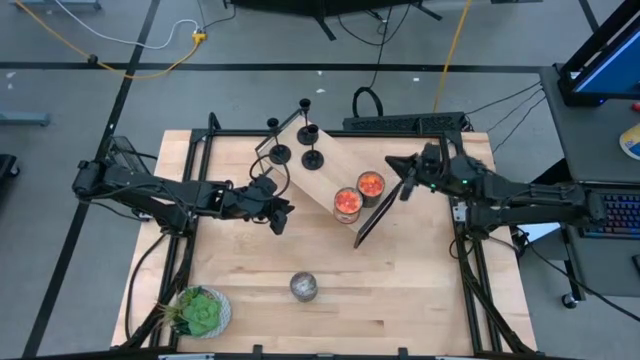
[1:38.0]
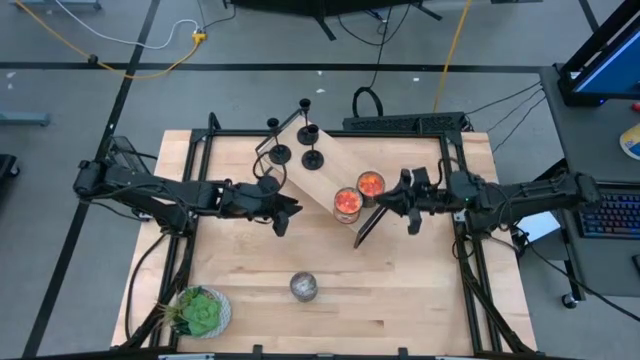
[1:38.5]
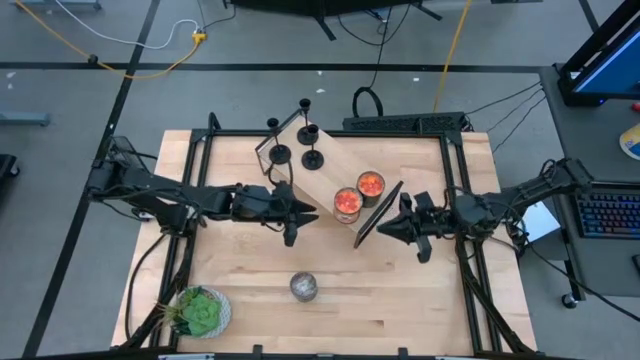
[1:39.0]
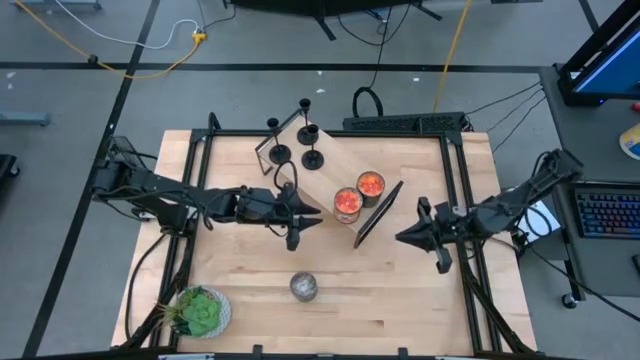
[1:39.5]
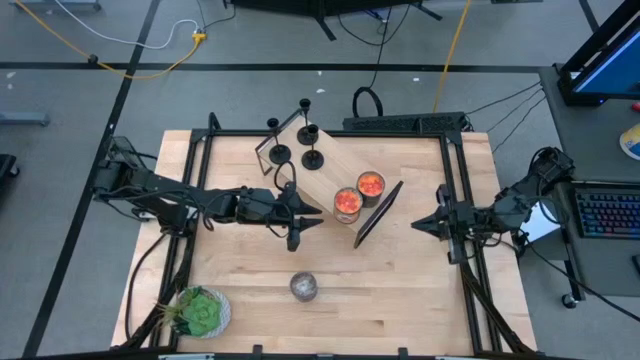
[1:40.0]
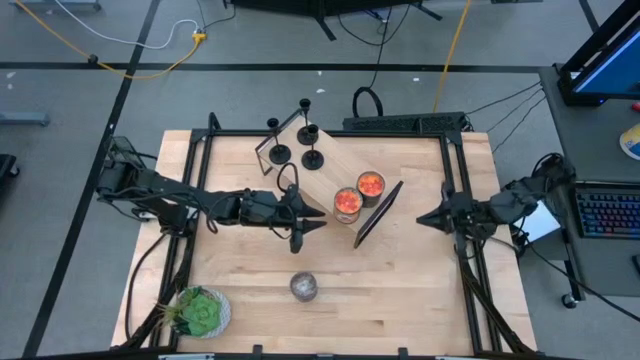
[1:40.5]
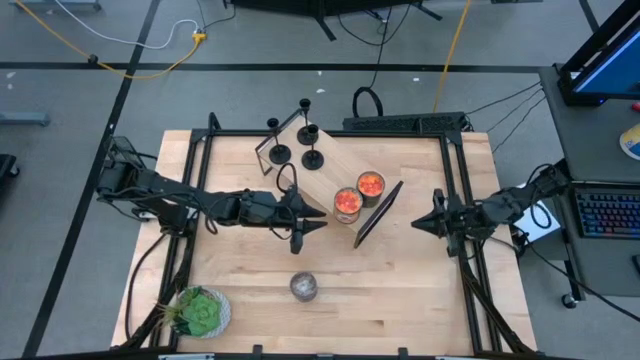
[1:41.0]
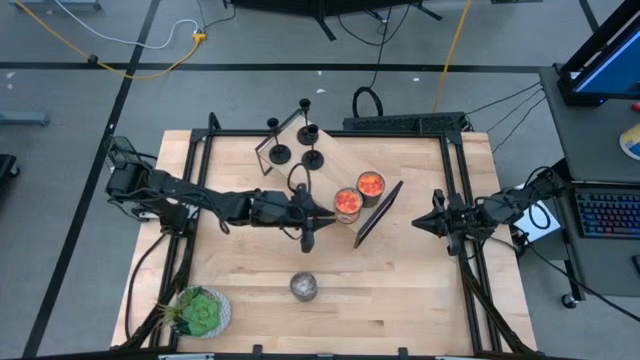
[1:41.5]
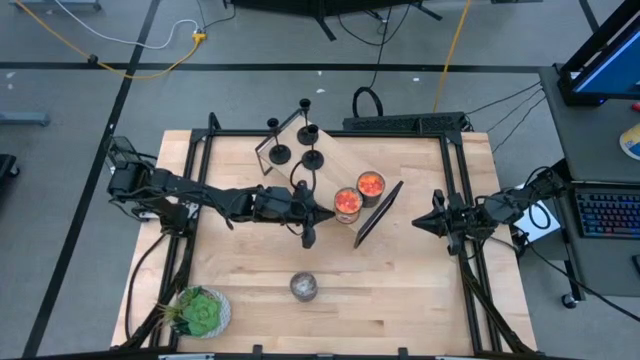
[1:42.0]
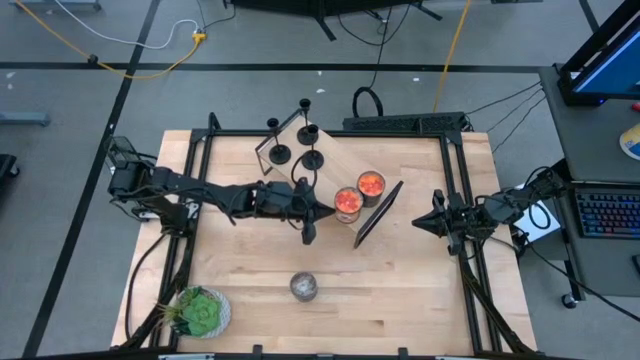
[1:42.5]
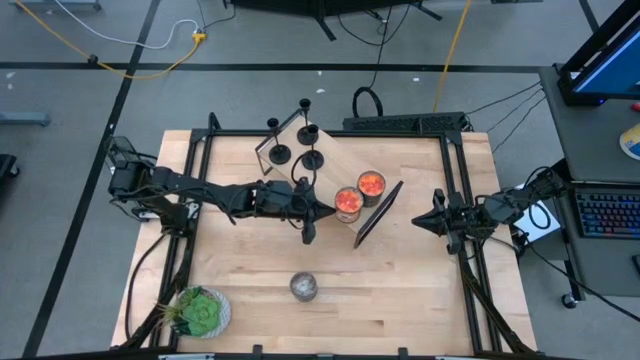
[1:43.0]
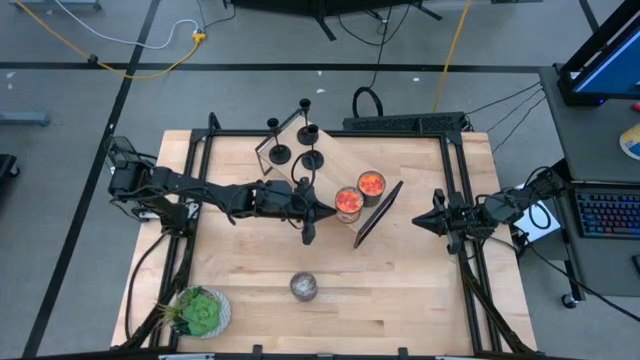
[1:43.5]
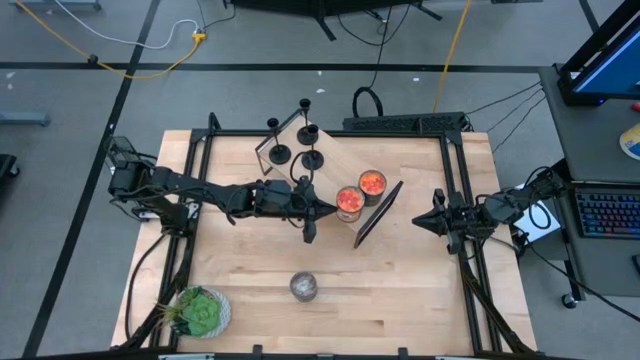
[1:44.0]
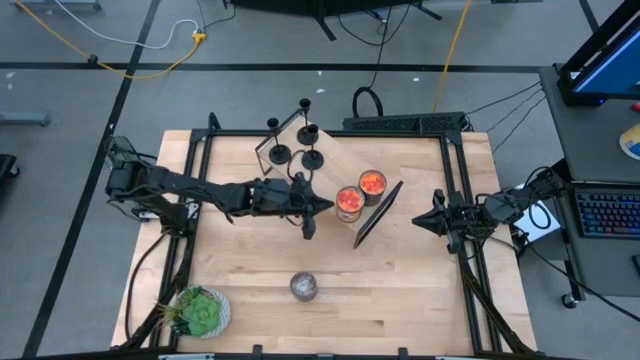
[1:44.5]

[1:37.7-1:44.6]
Task: Pick & Place candle stick holders
Adjust the orange scented candle on the shelf

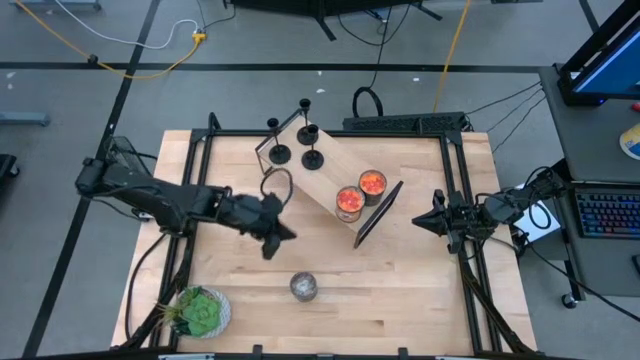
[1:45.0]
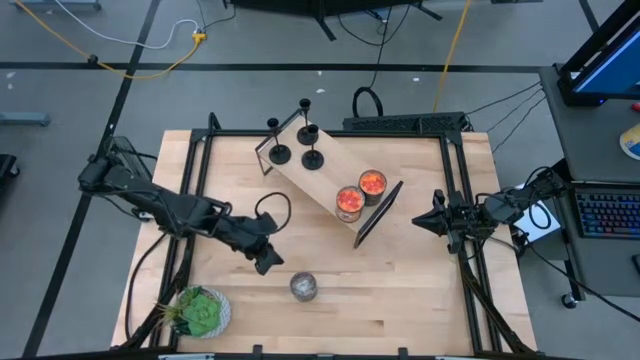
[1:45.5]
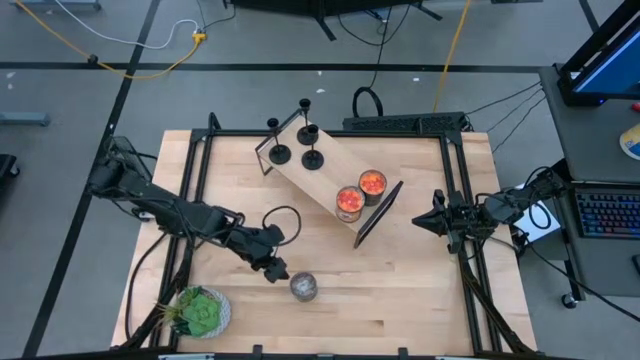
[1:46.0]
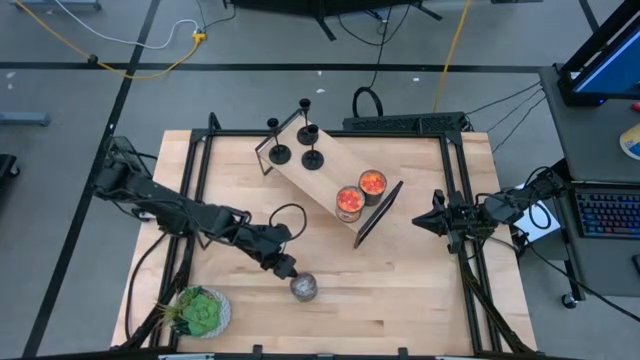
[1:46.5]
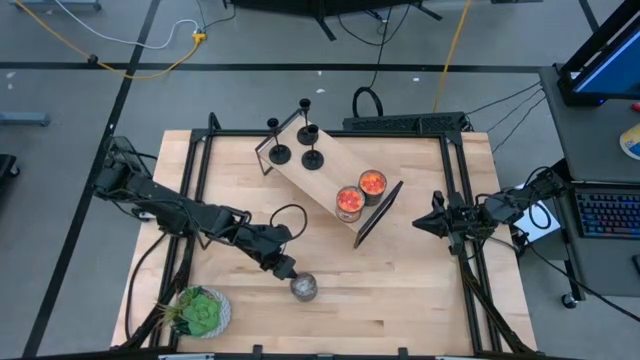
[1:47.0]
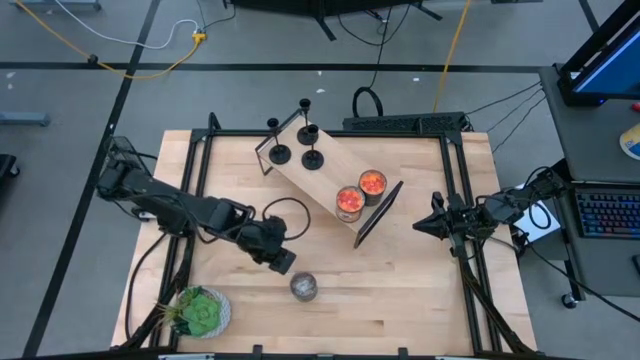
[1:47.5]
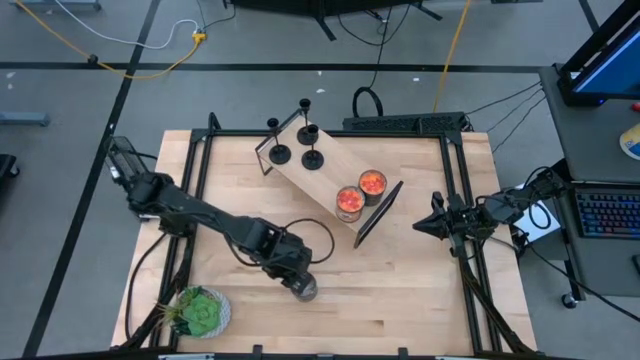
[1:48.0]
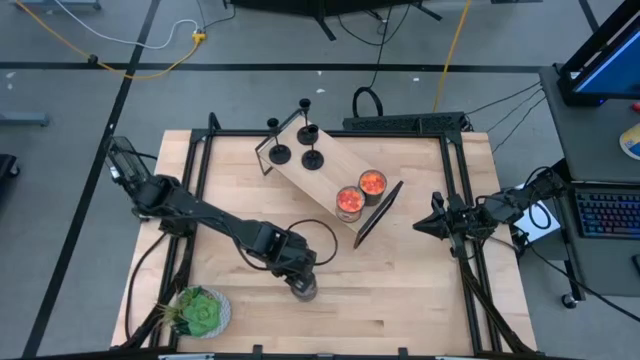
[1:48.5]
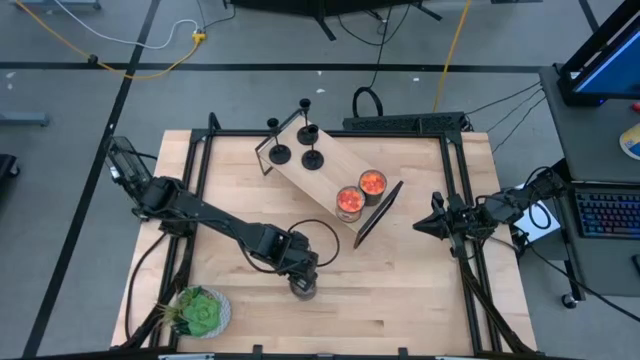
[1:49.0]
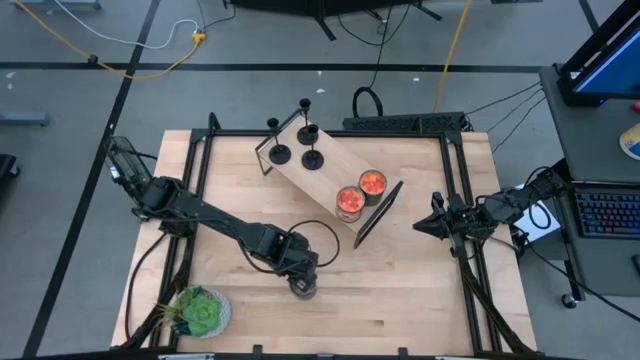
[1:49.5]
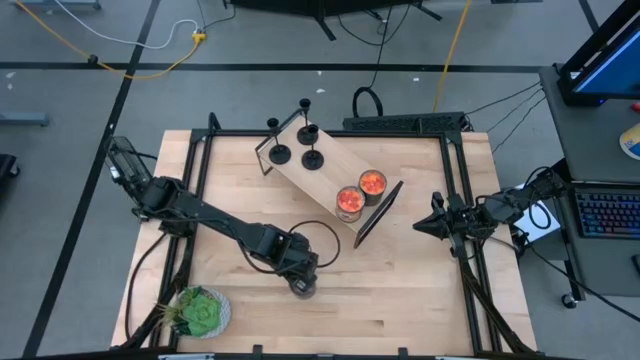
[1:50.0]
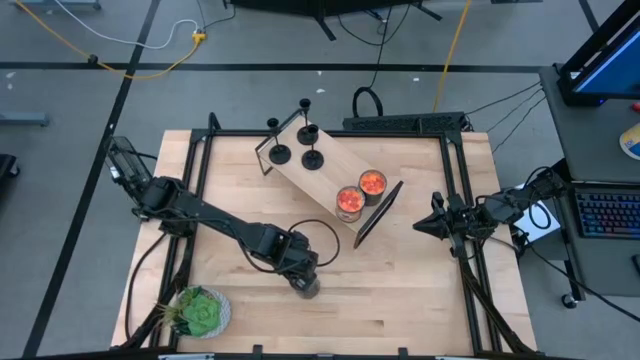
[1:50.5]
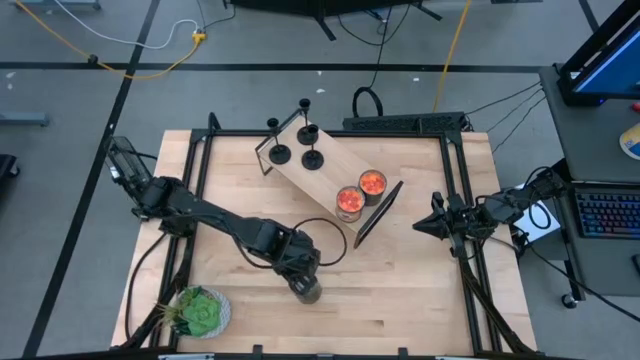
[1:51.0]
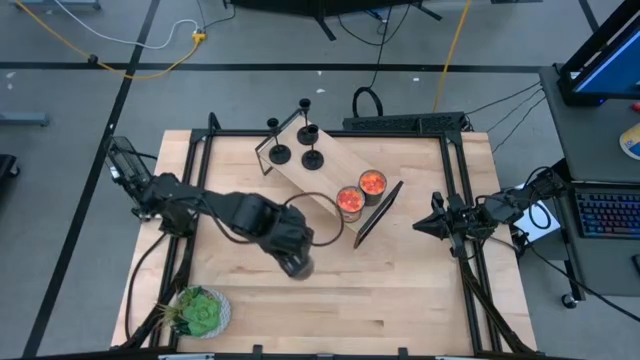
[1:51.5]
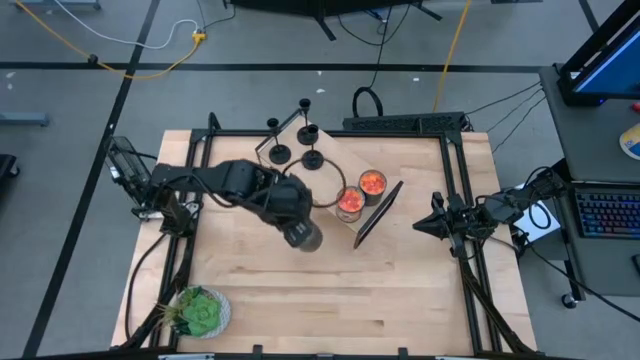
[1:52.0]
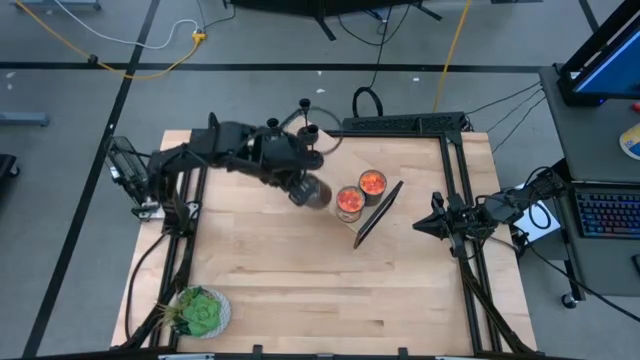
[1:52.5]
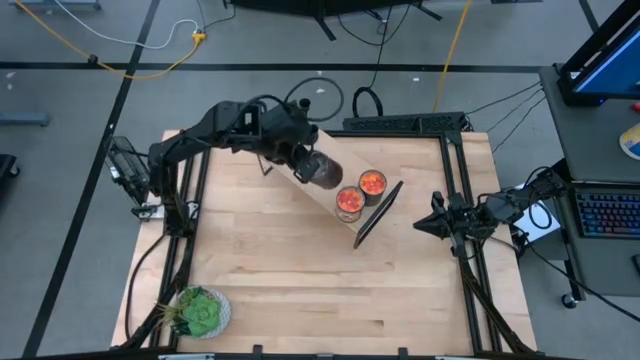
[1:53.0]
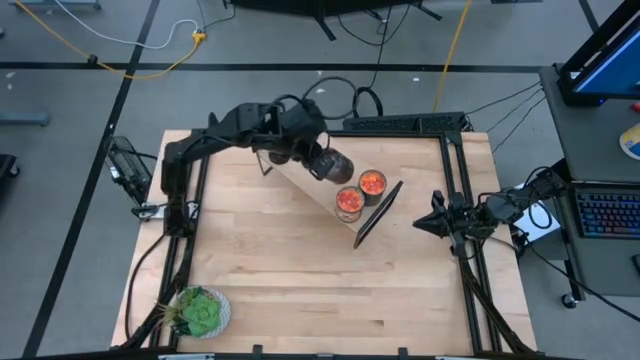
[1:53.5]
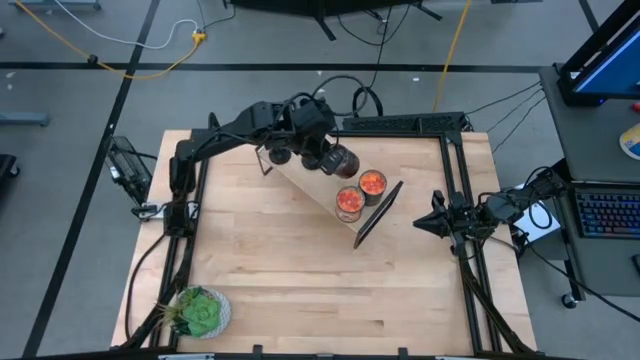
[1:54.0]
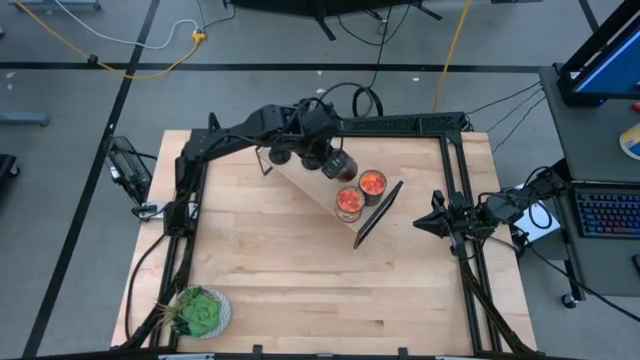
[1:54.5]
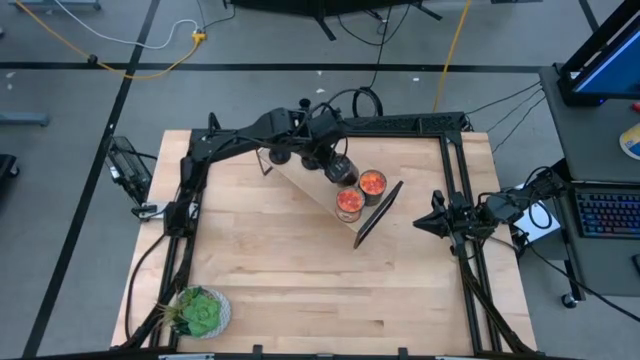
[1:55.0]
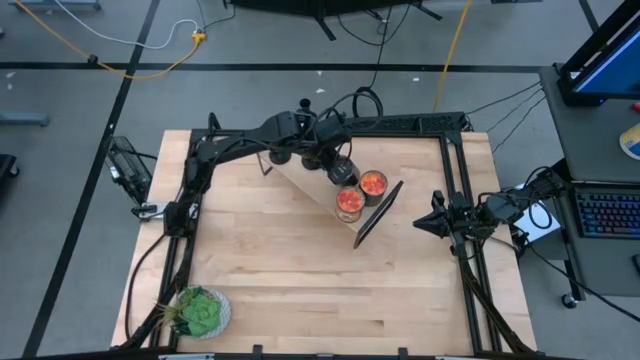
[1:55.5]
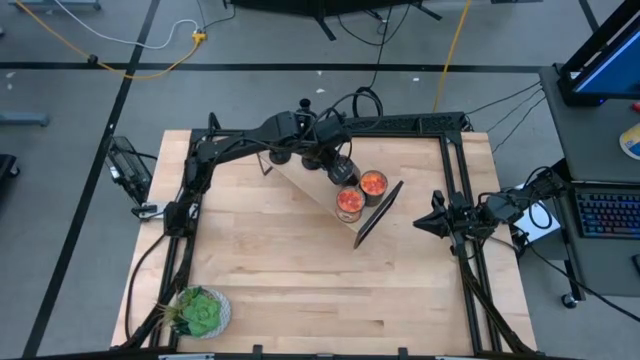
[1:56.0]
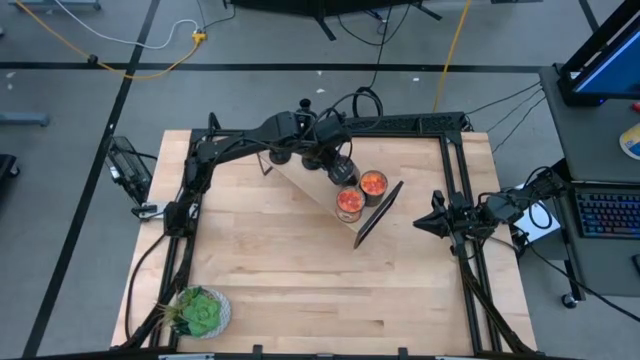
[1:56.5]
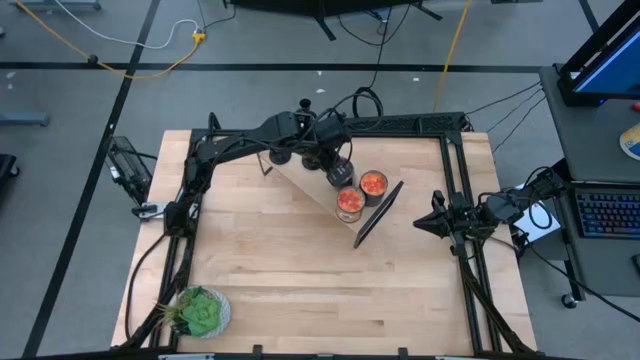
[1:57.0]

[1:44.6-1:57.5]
Put the brown scented candle on the shelf

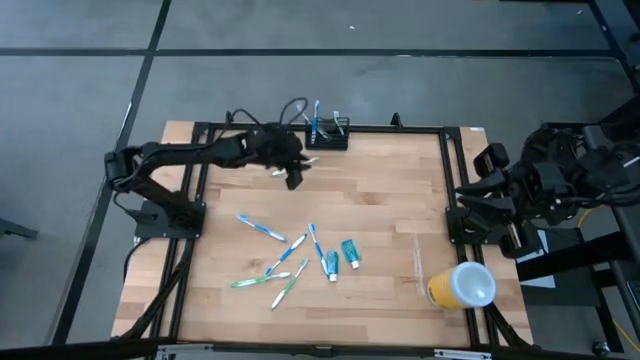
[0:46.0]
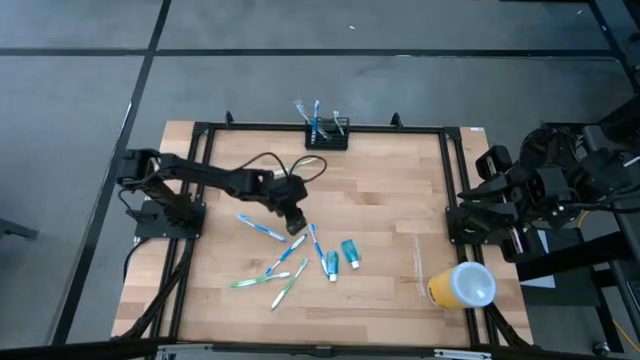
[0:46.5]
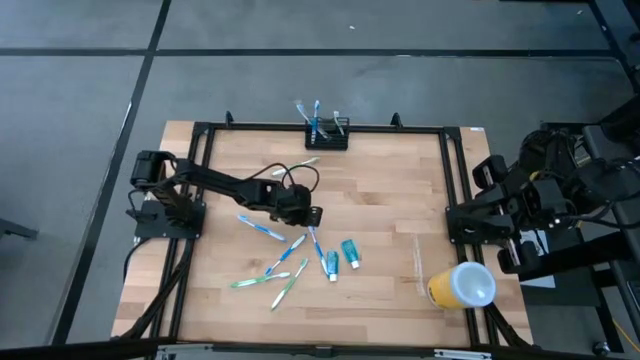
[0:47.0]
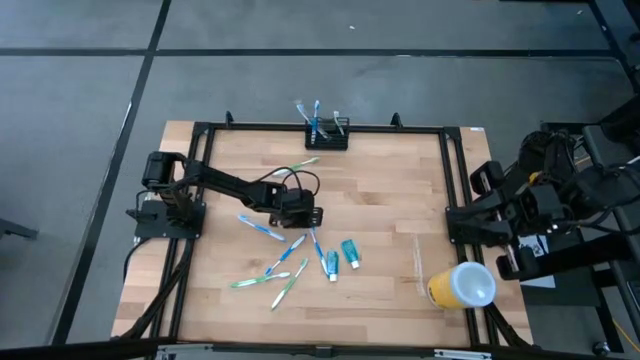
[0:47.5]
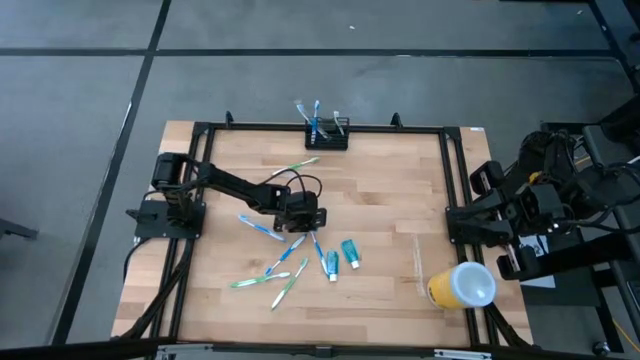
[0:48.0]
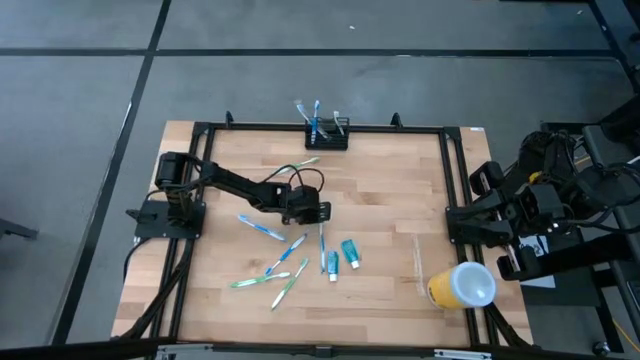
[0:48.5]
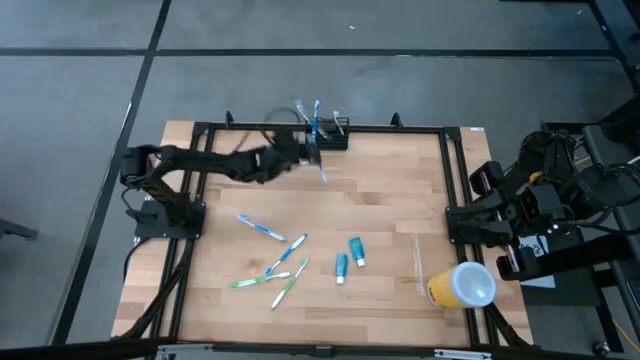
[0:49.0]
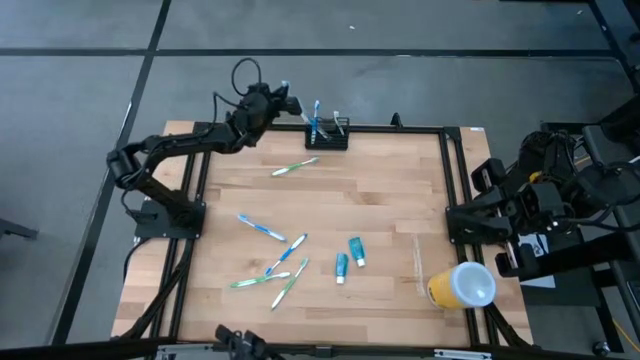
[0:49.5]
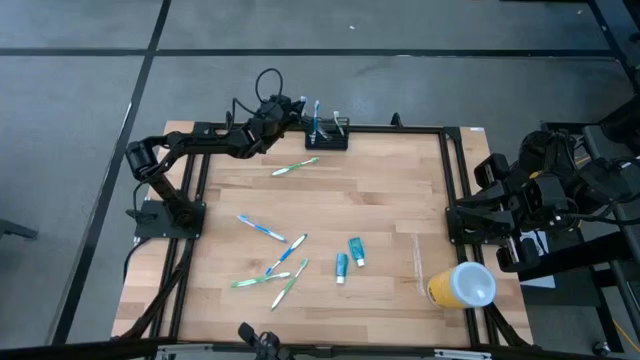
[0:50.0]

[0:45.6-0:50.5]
Task: Pick & Place toothbrushing station
Put the blue toothbrush into the wire organizer
